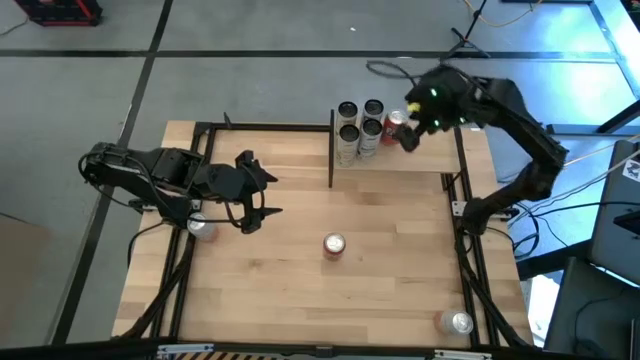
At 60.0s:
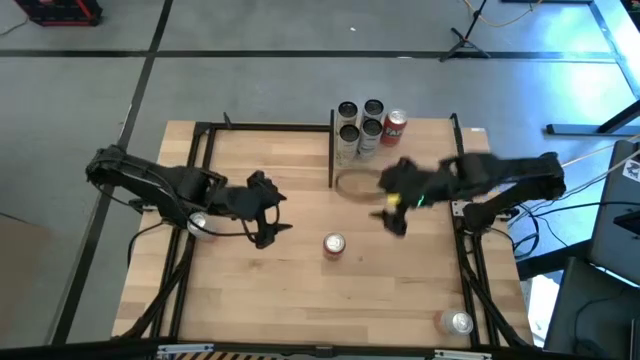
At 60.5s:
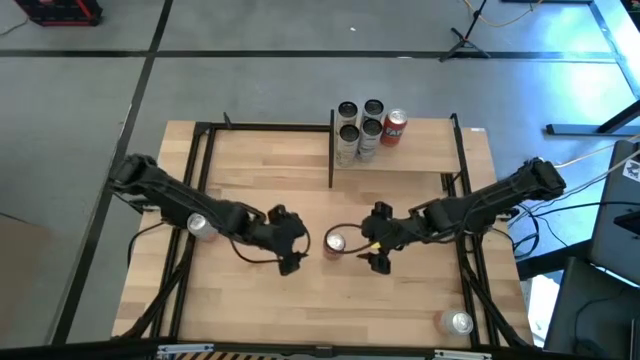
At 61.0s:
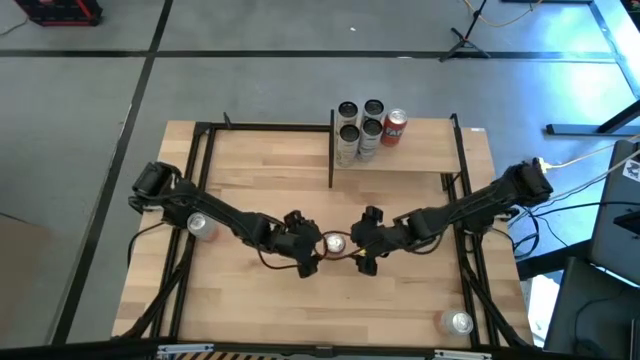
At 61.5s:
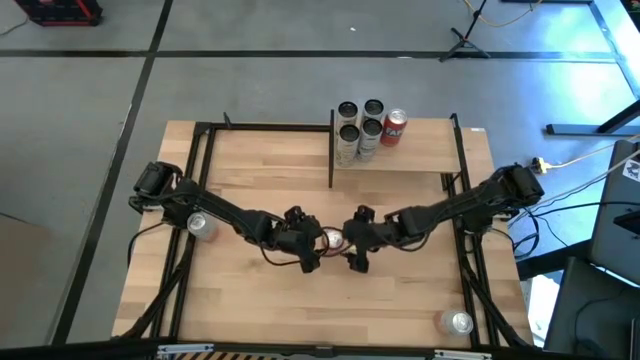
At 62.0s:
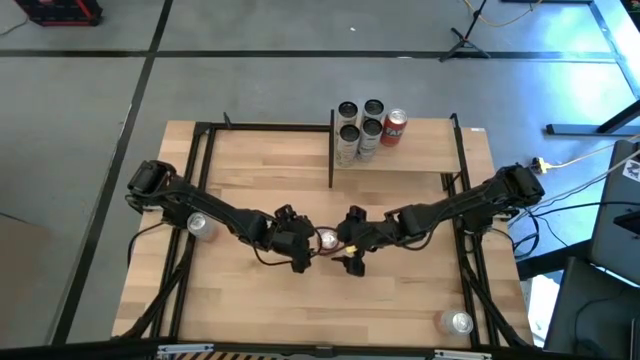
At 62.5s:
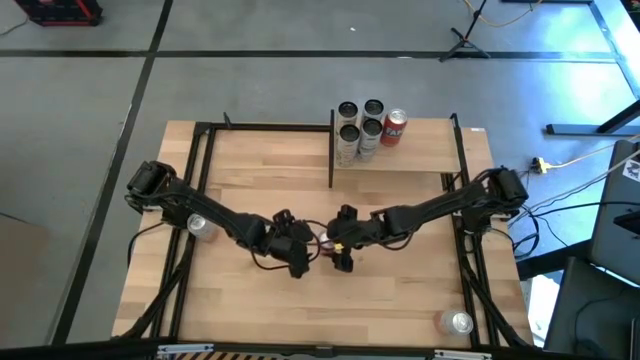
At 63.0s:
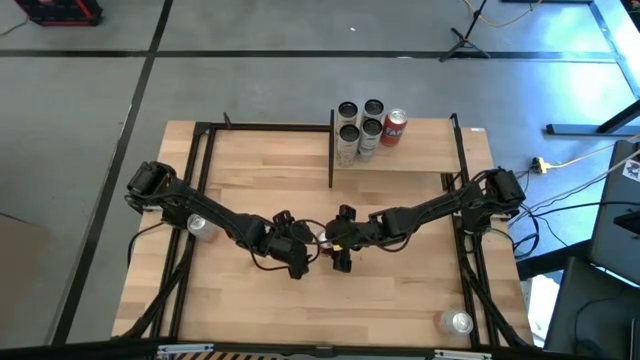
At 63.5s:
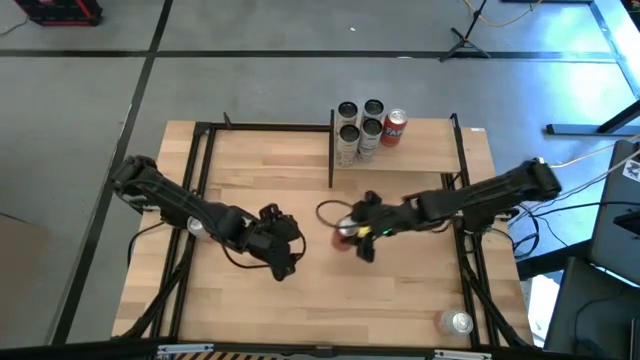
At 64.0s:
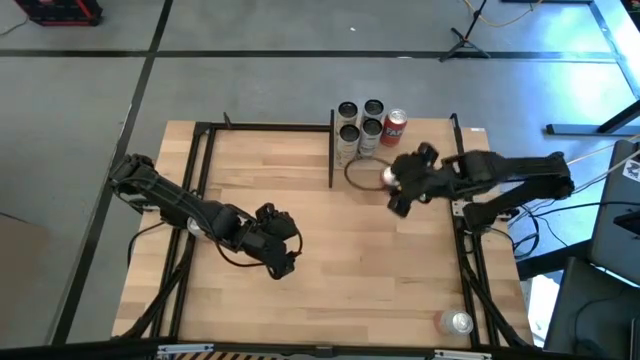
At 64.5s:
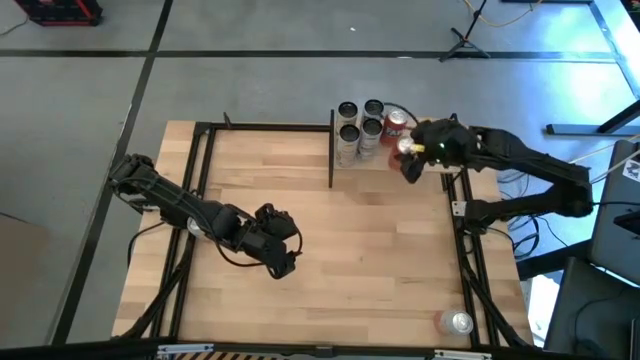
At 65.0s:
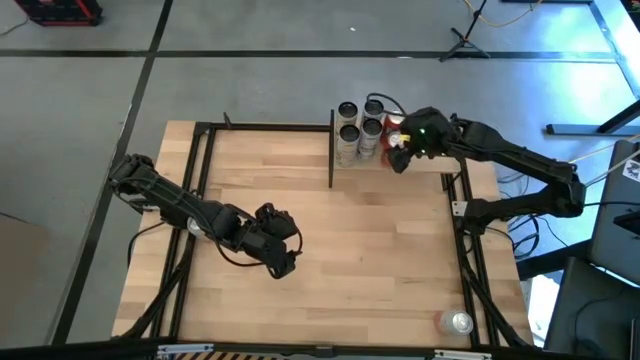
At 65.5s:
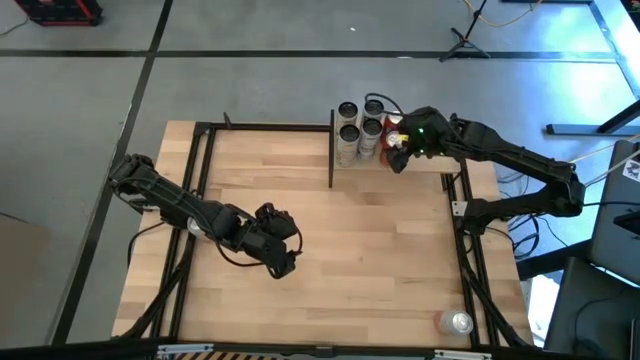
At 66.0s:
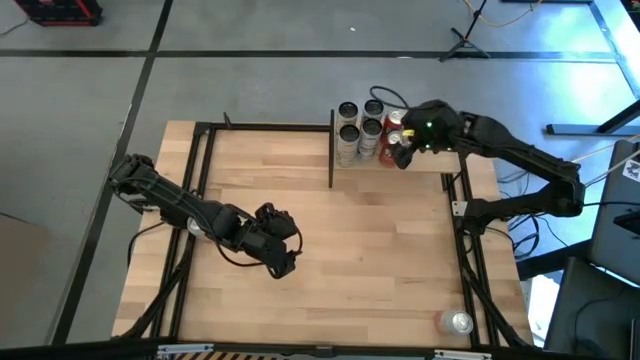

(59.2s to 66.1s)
Task: Place canned beverage on shelf
Put the red soda can on the shelf aligned with the other red soda can

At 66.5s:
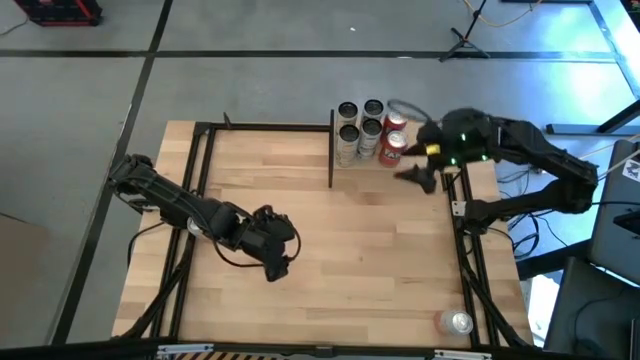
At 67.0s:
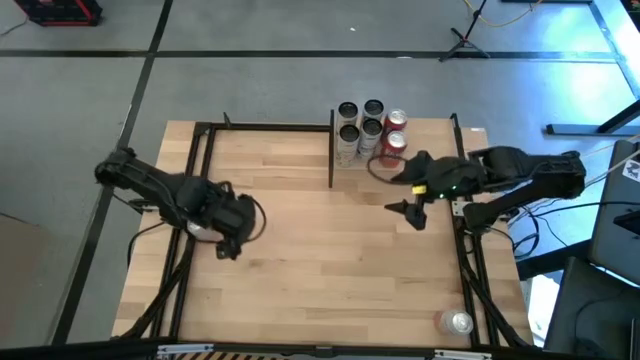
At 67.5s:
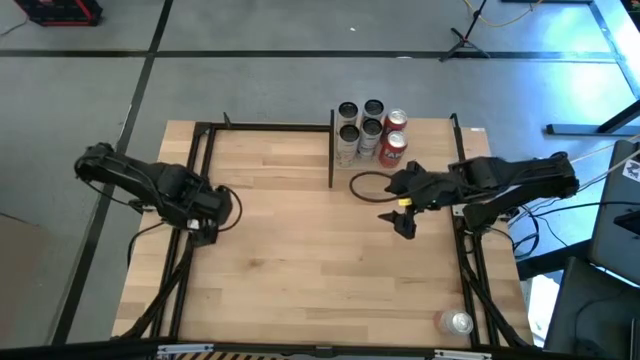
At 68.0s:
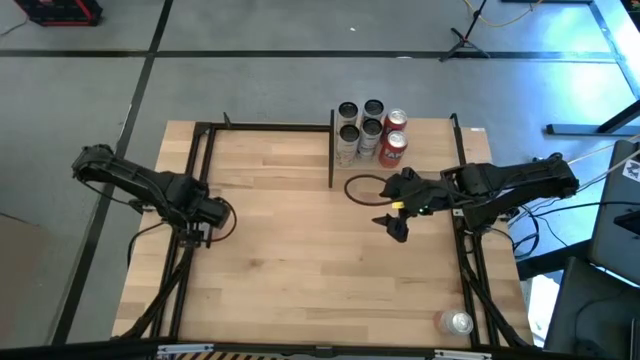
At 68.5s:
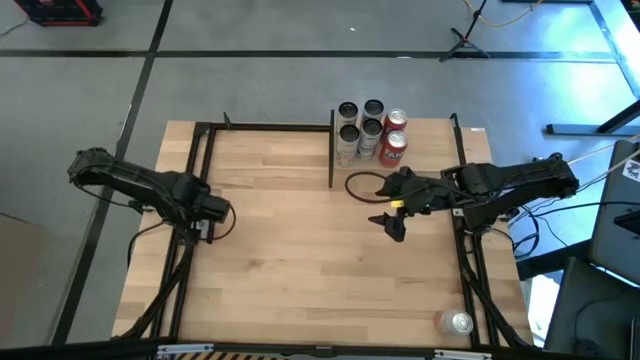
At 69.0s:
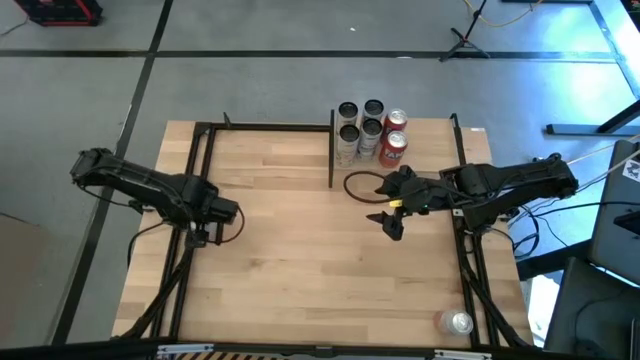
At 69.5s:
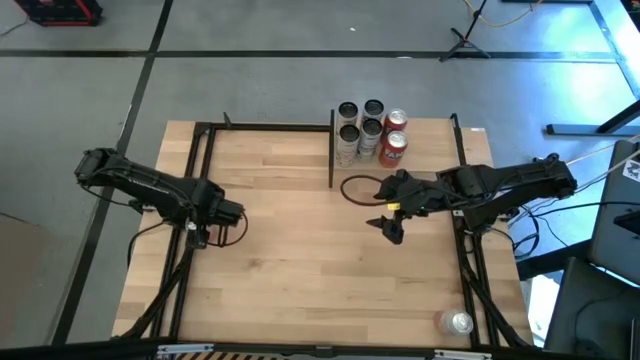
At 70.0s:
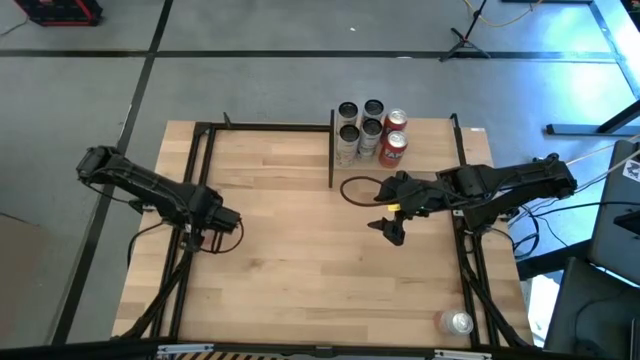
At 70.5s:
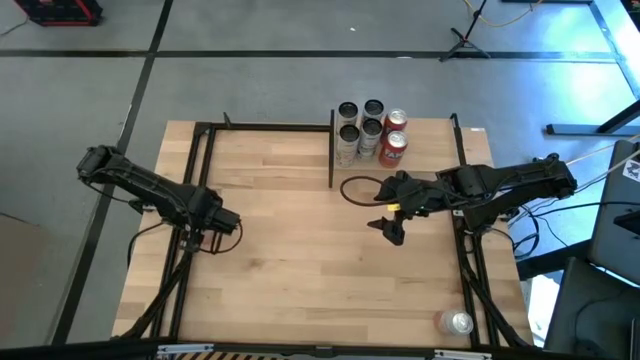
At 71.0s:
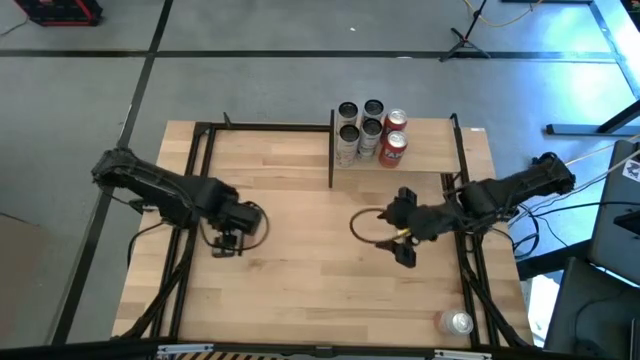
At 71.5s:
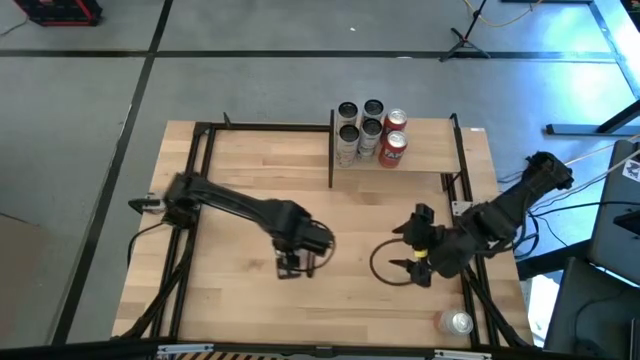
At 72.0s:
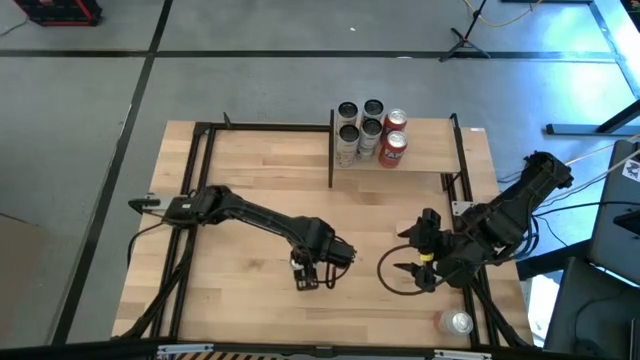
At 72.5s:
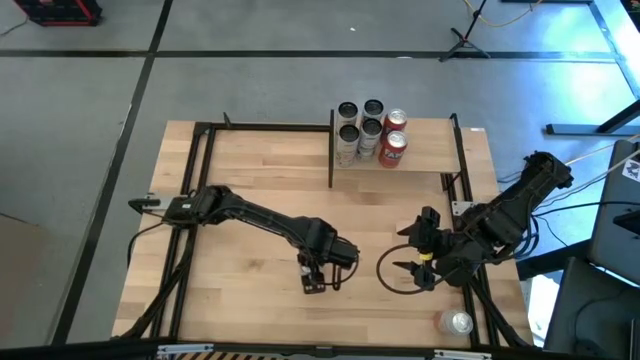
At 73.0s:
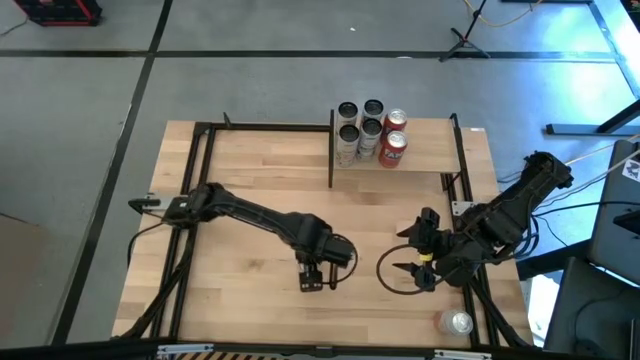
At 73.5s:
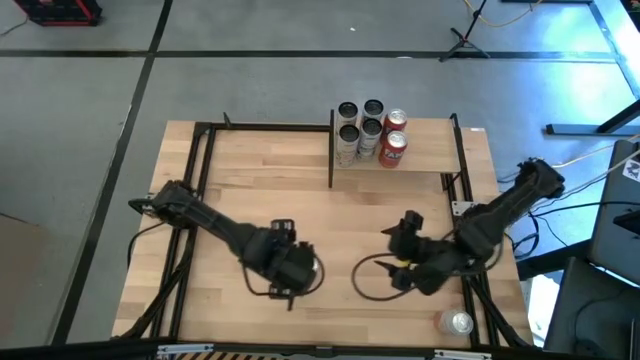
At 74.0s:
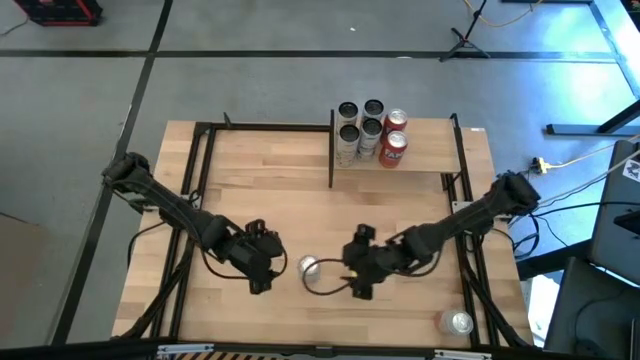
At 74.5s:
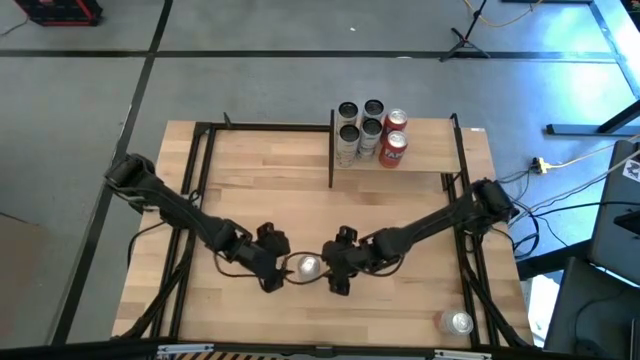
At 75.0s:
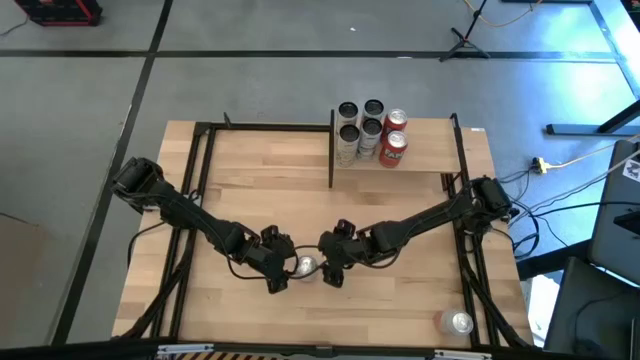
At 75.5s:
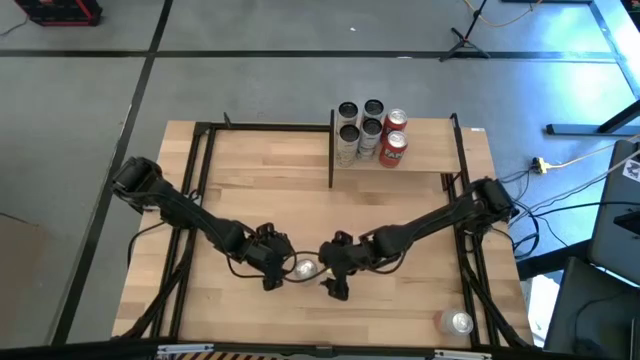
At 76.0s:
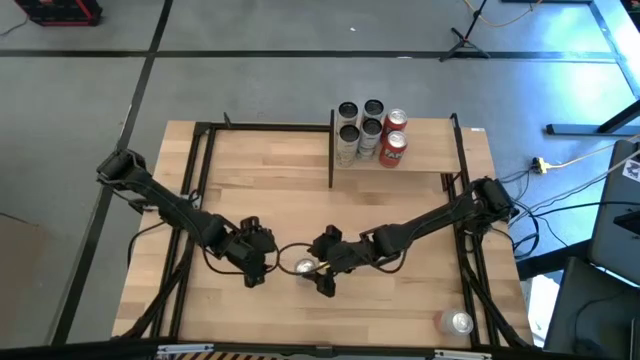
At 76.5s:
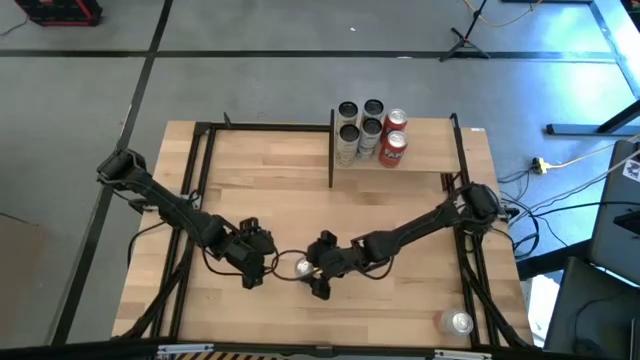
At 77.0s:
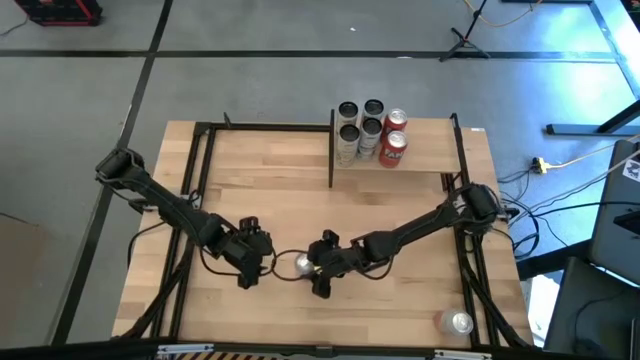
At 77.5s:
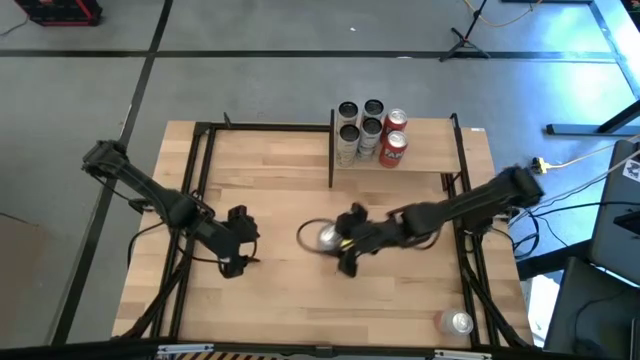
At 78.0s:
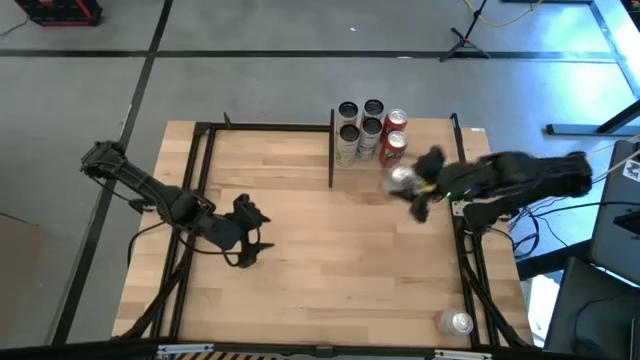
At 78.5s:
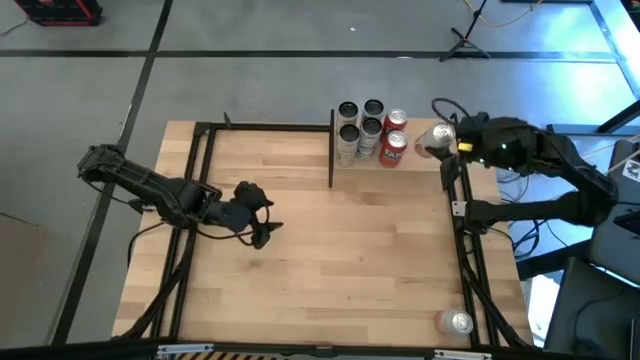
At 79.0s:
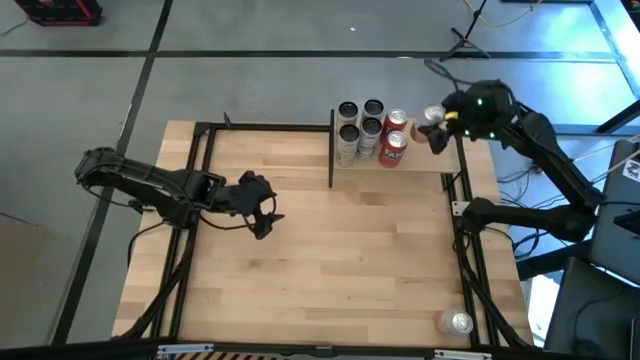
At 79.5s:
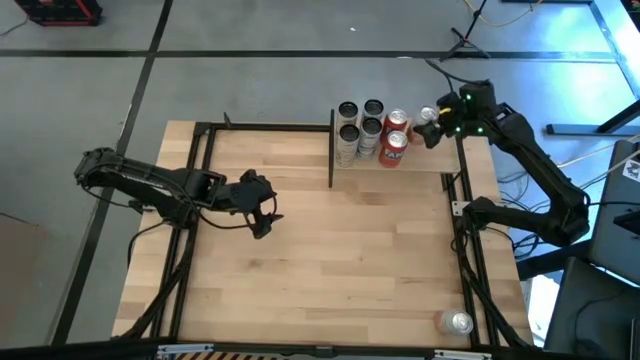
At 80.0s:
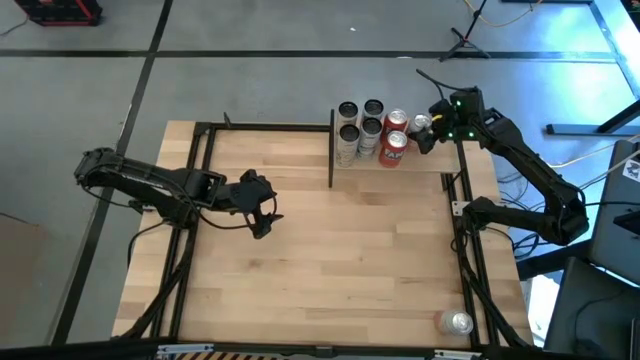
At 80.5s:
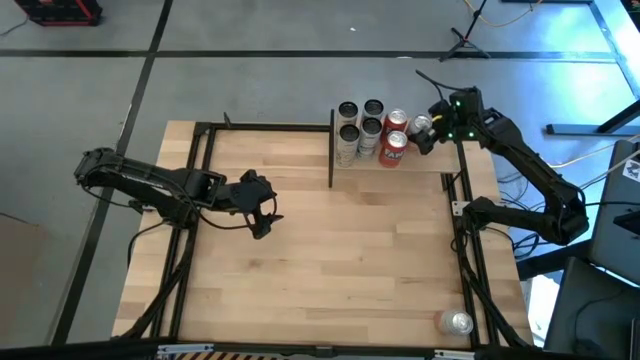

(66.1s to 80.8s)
Put the top orange white soda can on the shelf

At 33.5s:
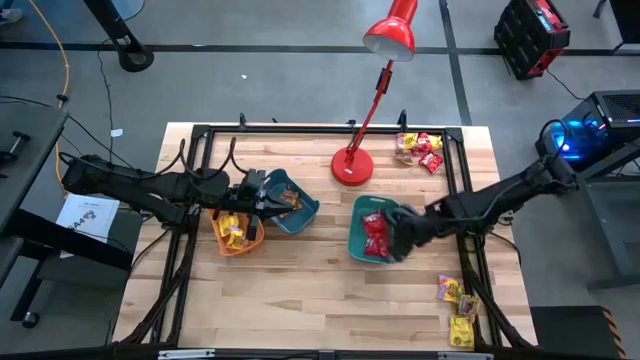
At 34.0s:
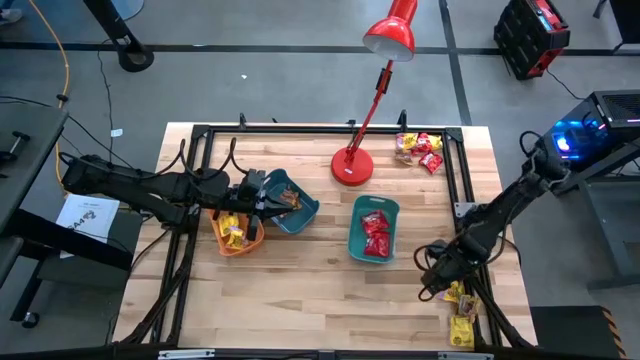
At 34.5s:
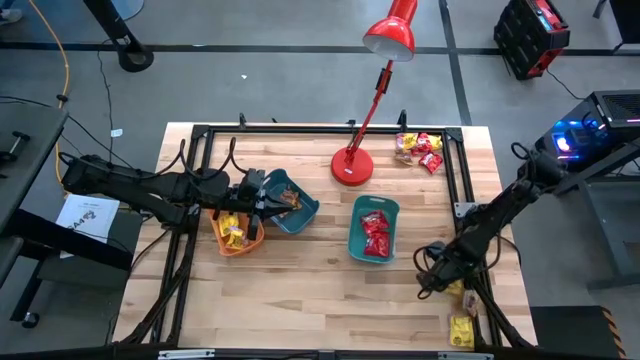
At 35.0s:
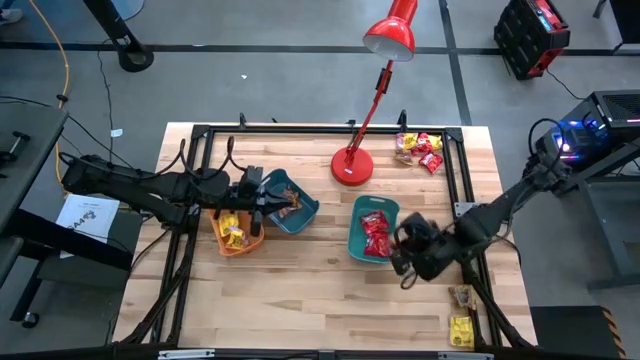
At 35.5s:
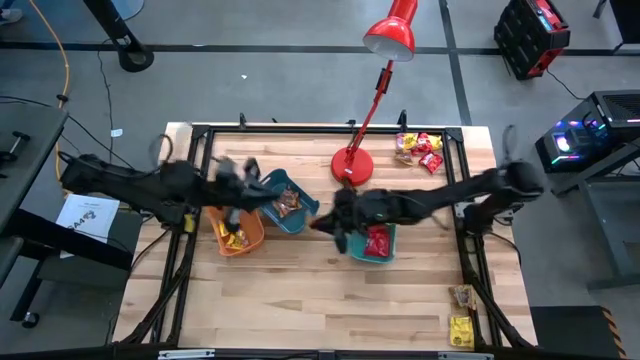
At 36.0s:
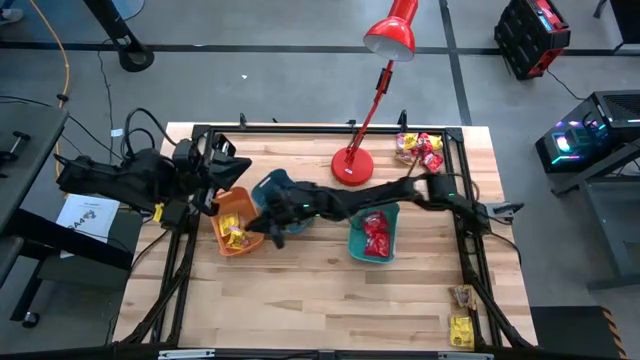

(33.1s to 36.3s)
Task: Sort candy
Put the bottom right yellow candy into the orange bin
